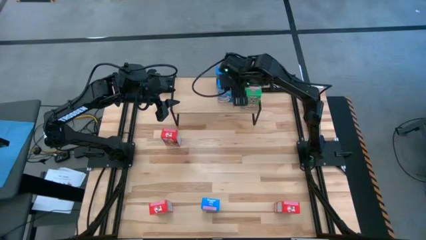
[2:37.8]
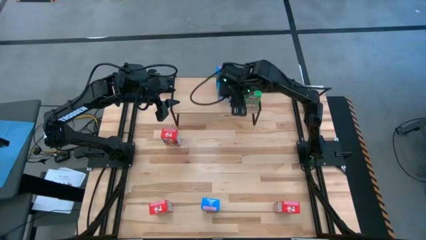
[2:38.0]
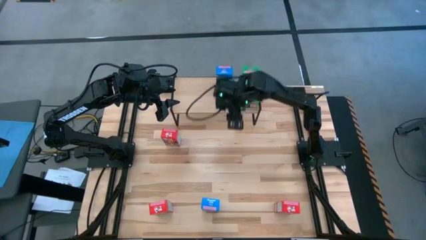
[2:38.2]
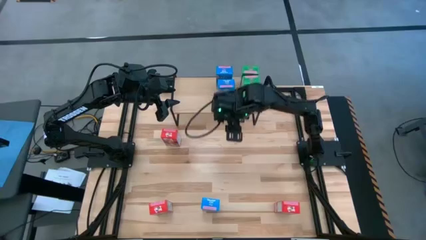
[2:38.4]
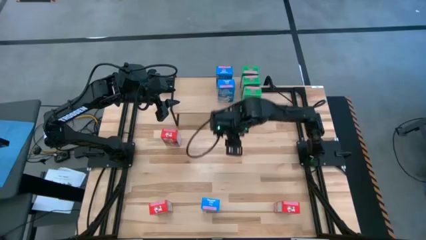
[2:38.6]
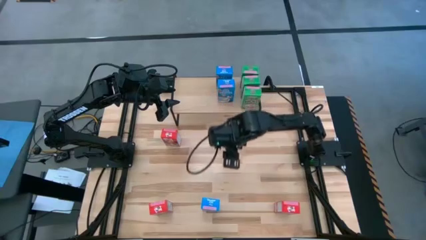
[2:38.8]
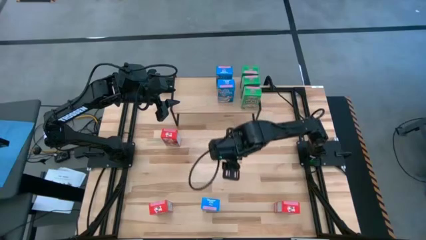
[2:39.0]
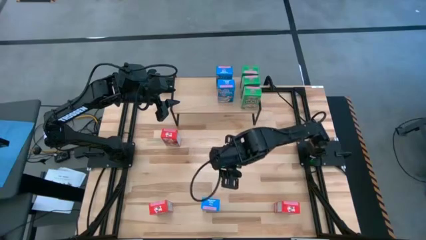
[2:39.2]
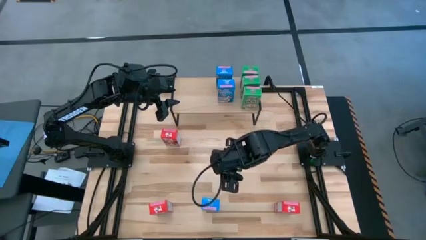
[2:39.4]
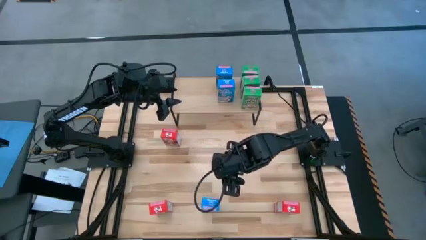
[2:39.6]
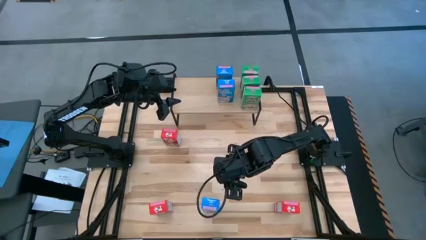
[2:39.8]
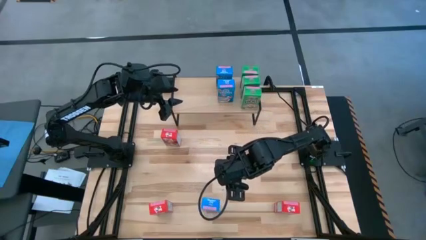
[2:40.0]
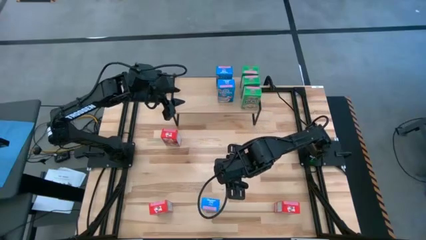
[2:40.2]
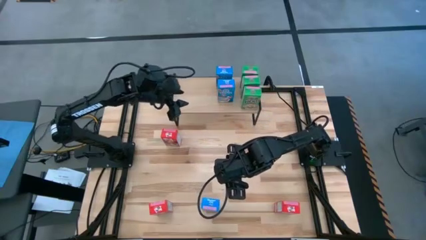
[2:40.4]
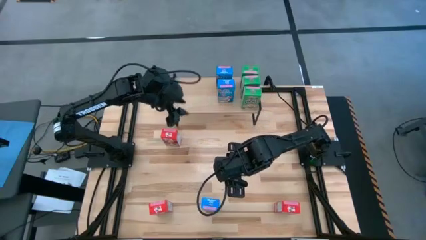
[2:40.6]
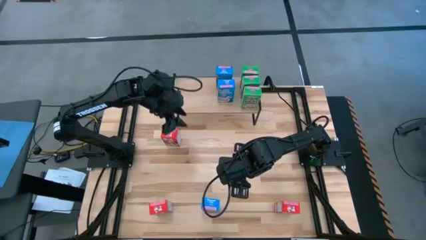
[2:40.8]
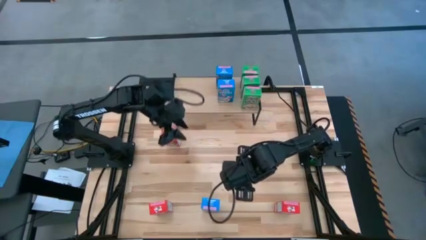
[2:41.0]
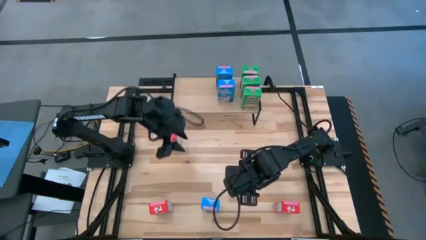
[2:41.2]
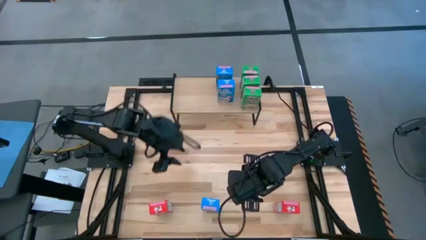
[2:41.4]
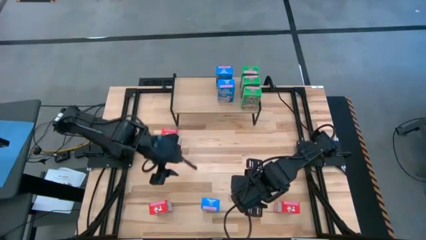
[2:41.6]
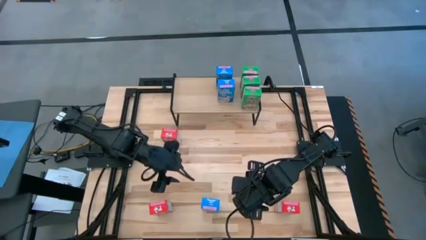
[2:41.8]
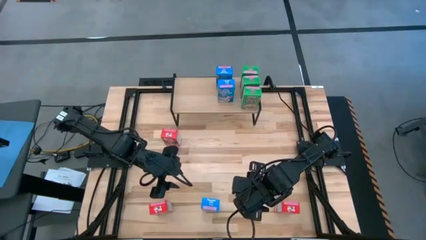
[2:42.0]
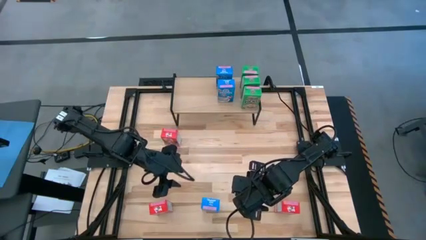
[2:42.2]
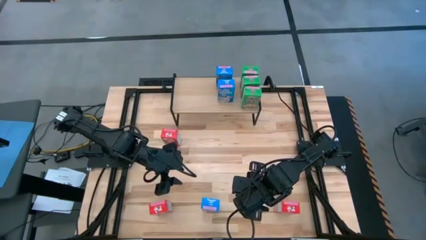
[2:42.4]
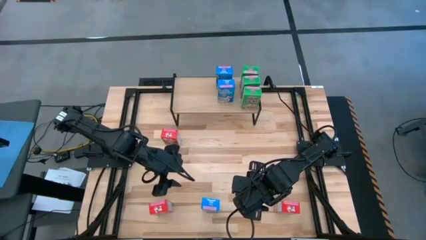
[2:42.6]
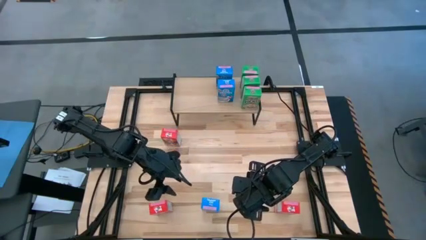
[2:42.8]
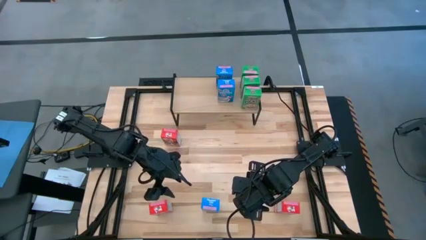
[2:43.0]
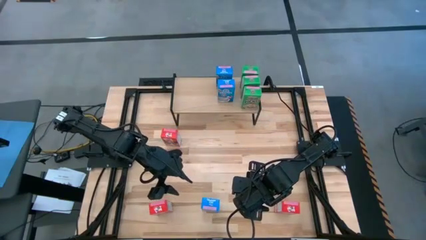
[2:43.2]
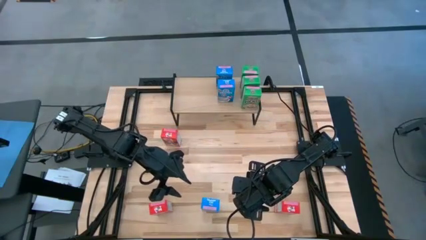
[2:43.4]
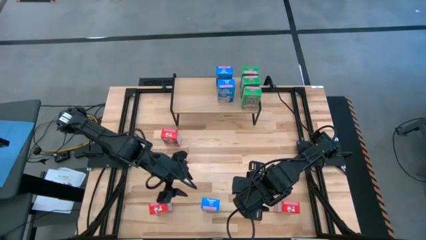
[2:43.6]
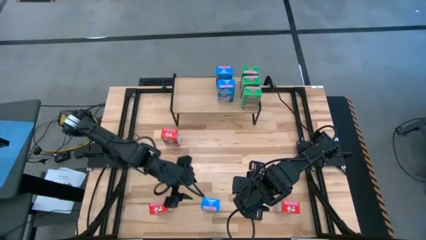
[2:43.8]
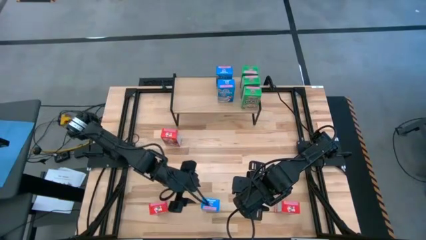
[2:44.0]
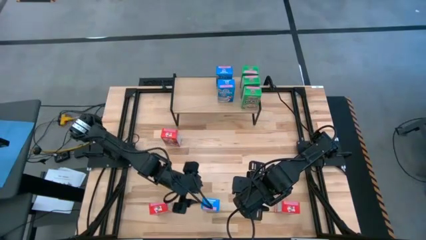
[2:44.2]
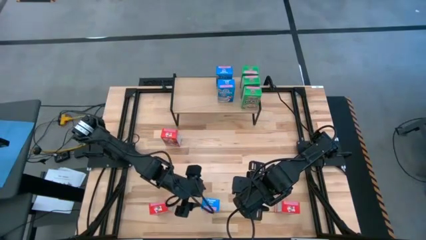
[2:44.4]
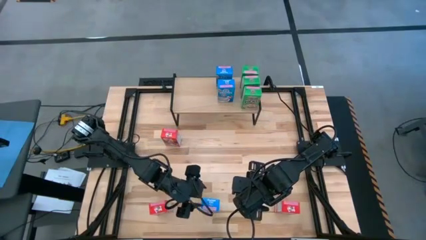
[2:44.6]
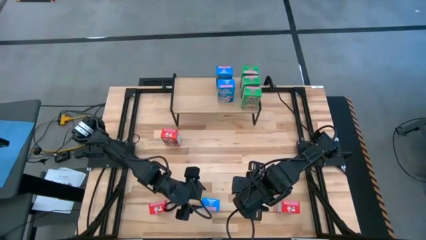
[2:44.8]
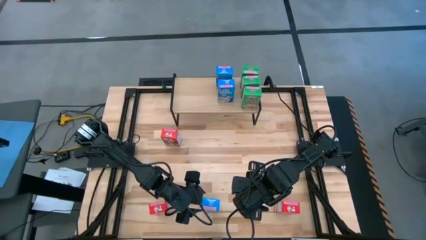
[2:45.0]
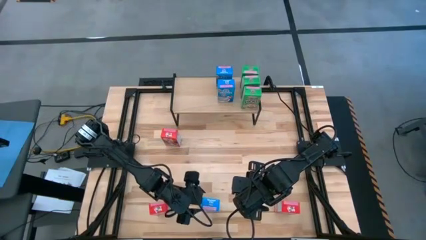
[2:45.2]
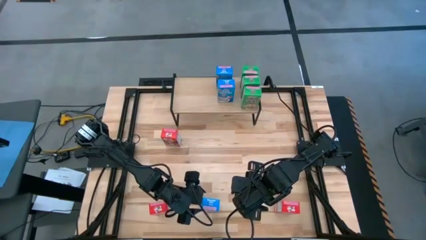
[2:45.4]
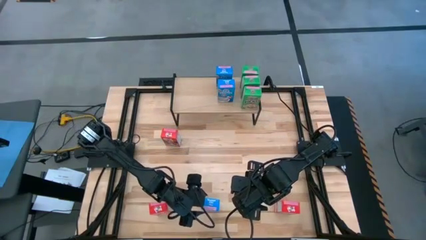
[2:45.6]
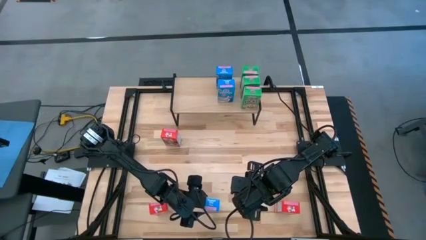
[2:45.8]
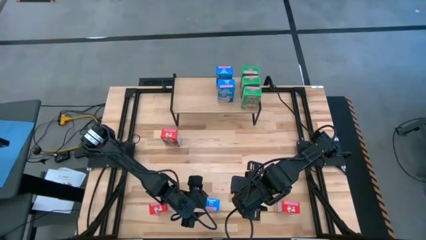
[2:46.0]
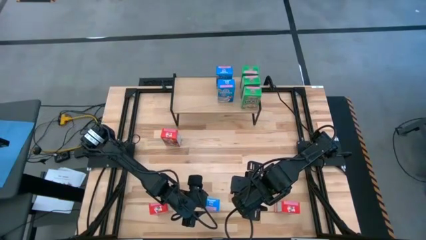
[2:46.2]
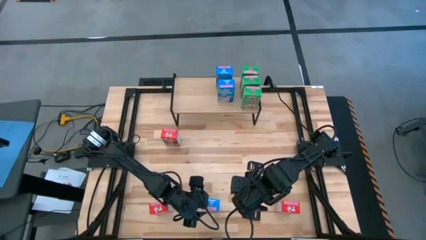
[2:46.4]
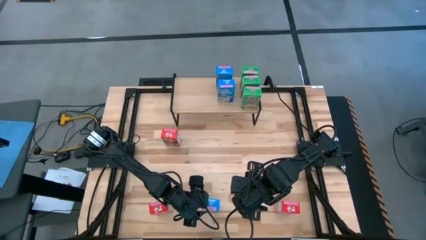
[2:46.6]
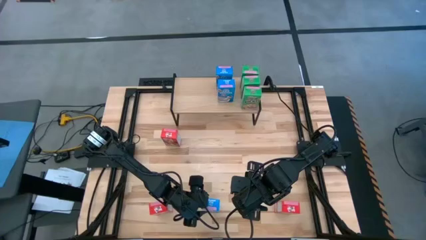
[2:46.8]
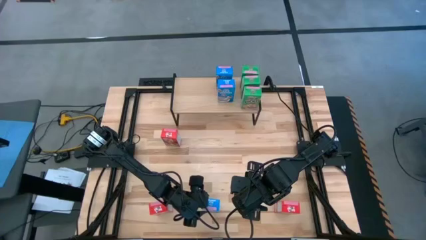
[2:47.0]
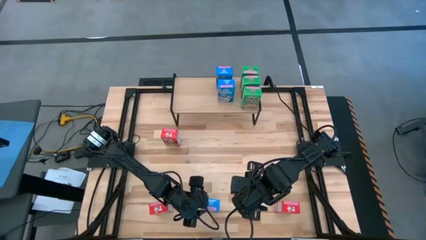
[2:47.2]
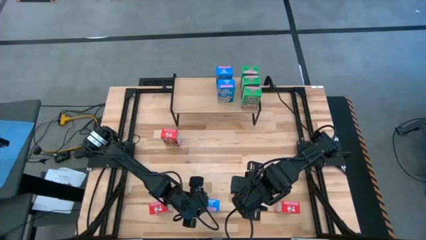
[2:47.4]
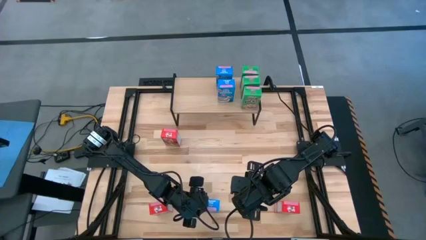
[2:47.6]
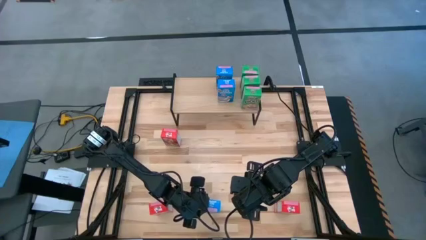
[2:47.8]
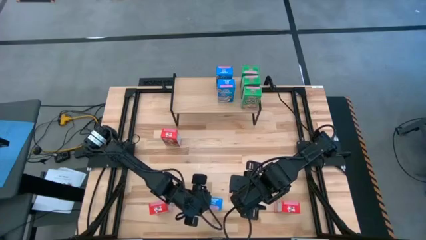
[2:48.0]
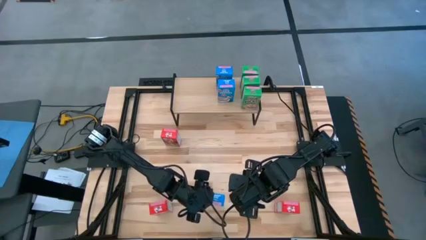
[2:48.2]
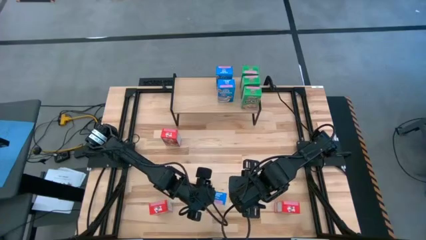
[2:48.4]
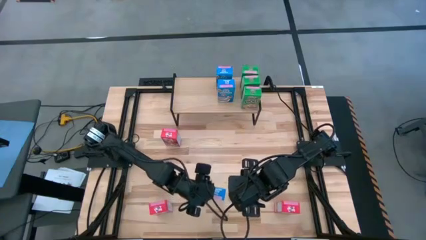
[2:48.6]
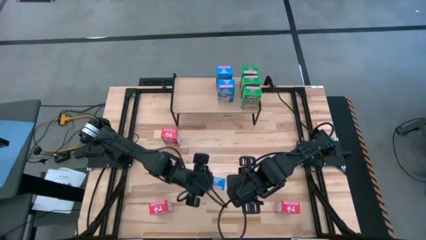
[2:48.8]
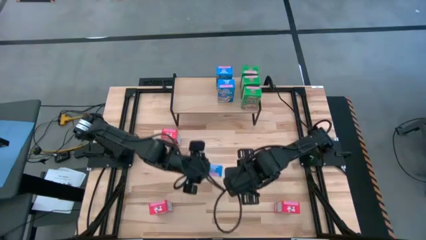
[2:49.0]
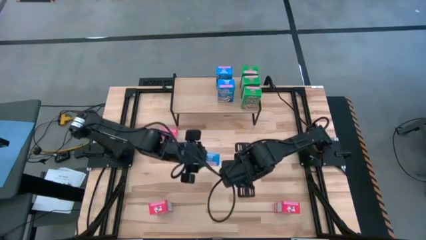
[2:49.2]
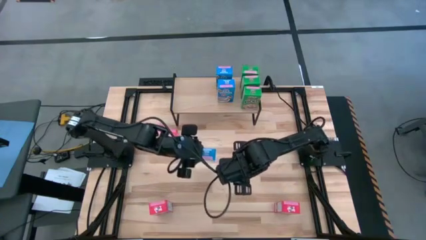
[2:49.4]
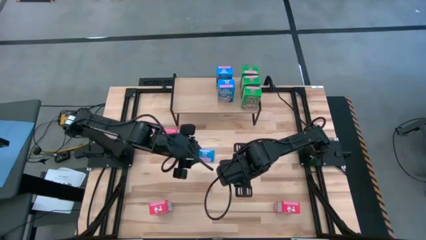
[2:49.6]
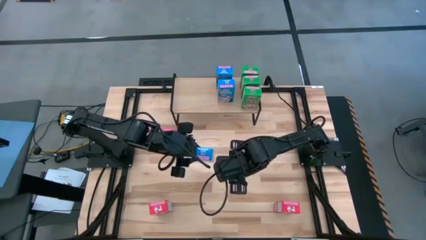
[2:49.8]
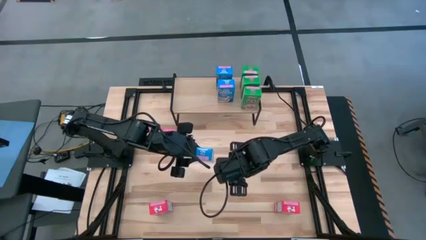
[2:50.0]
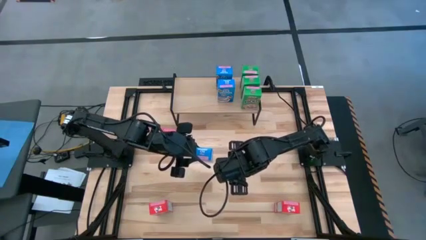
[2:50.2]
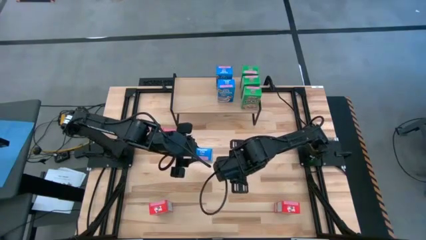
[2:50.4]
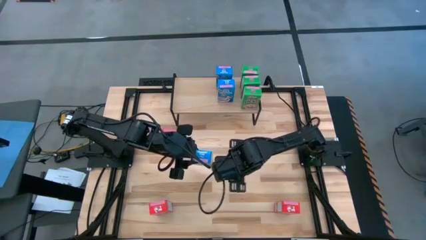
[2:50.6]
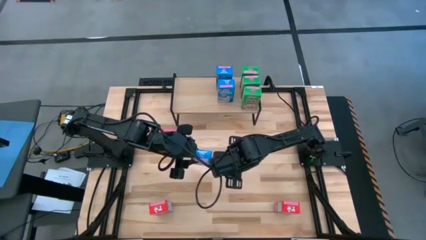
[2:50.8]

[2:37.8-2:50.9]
Task: Stack cereal on shelf
Put the blue cereal box on the shelf aligned with the other blue cereal box

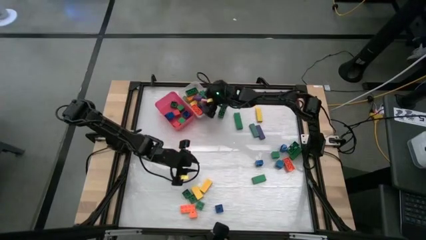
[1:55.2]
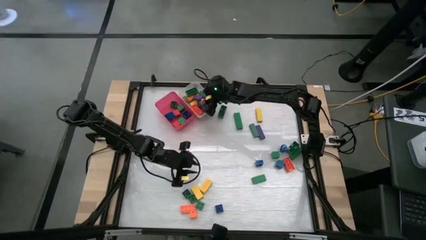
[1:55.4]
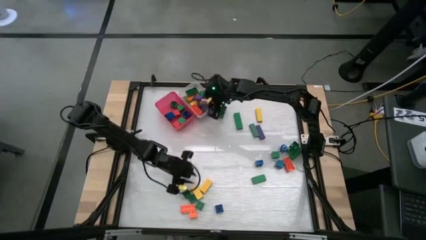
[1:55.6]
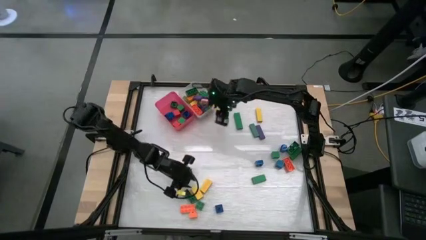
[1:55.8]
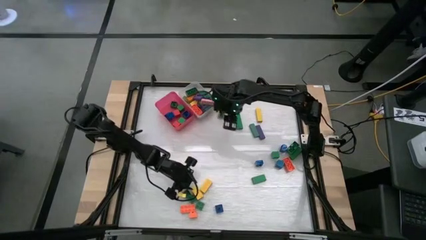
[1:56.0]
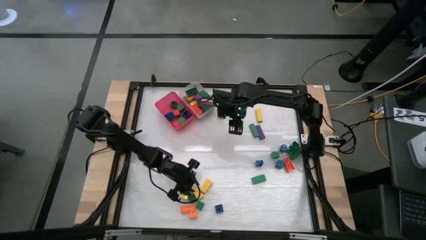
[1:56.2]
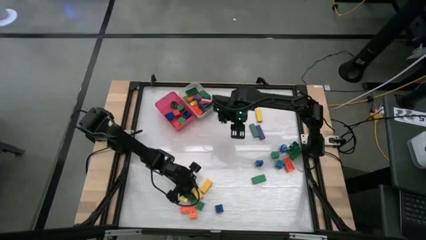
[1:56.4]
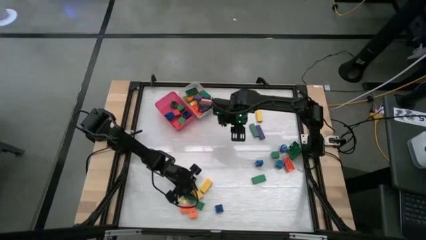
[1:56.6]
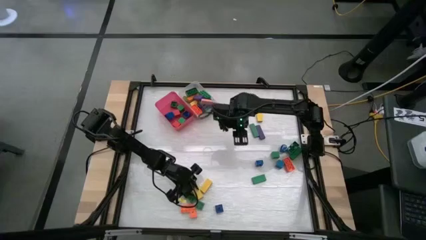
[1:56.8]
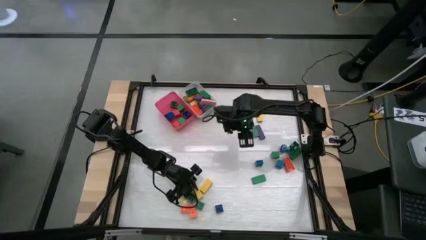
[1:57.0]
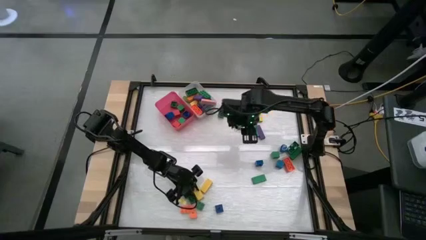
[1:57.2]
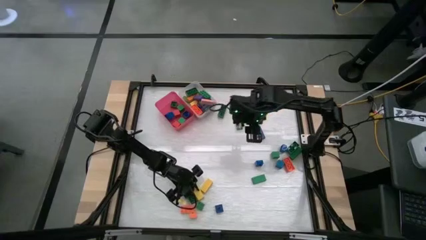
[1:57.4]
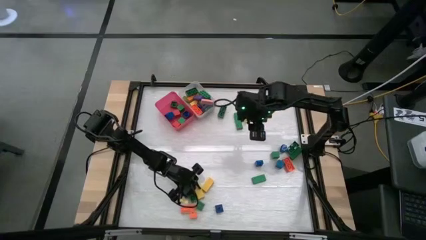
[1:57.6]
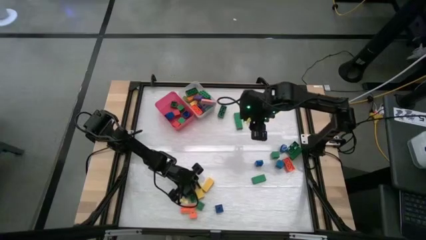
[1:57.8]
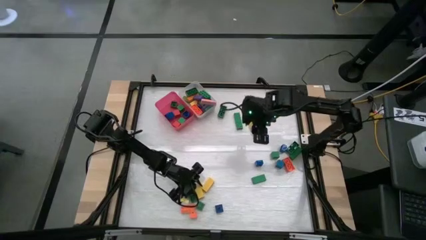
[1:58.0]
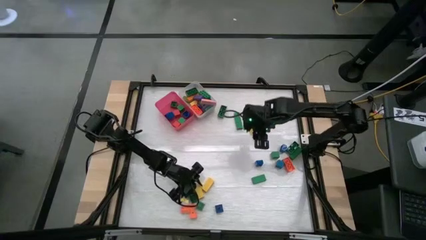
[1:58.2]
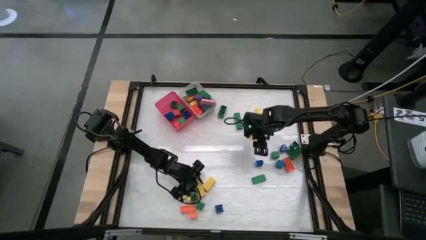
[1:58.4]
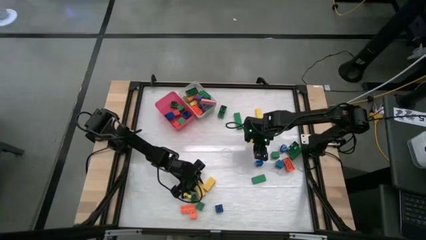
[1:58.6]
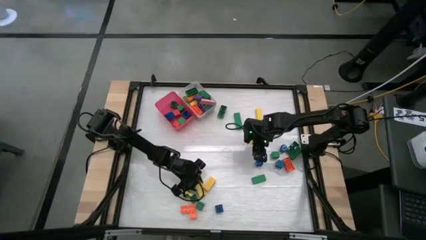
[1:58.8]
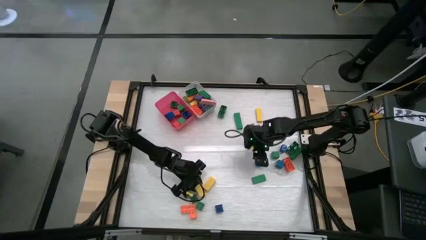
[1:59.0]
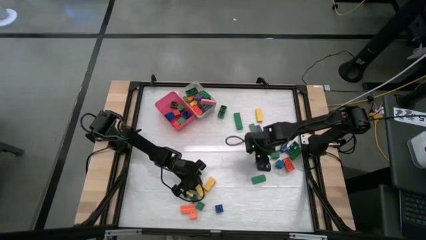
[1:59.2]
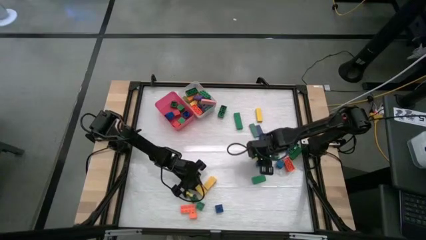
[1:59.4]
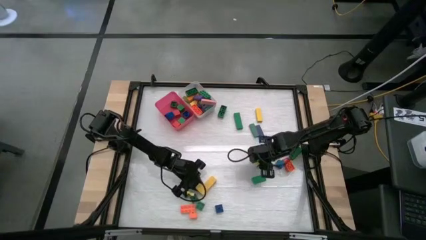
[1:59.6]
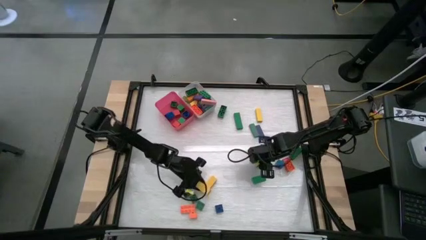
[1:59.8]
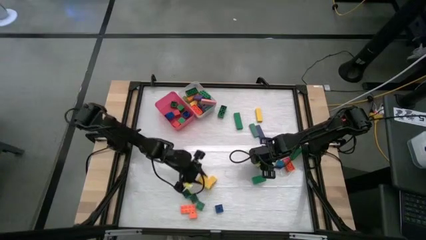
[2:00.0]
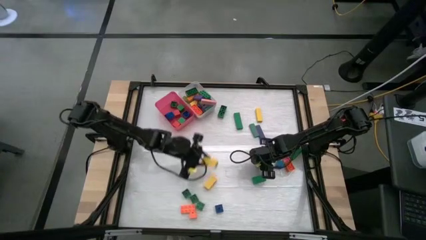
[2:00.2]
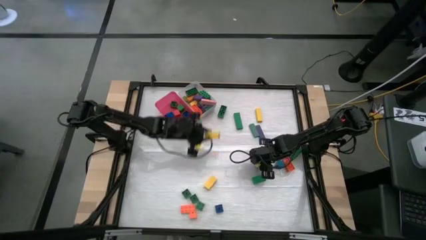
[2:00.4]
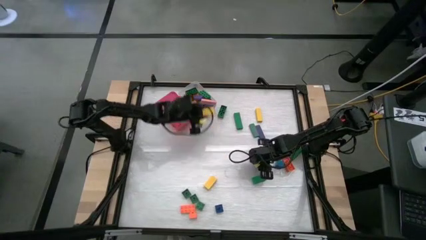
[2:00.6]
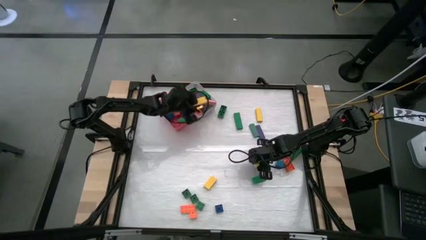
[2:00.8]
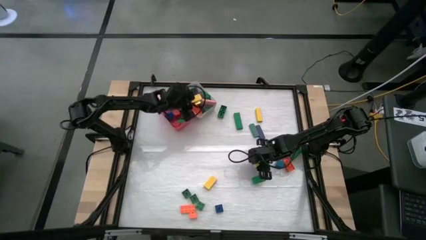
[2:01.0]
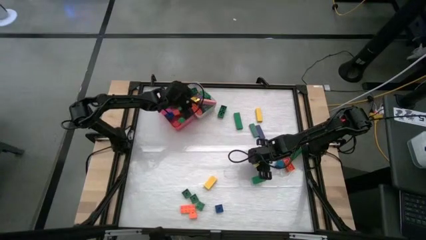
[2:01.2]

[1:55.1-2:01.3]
Task: Sort blocks by size
Put the big yellow block into the white bin
